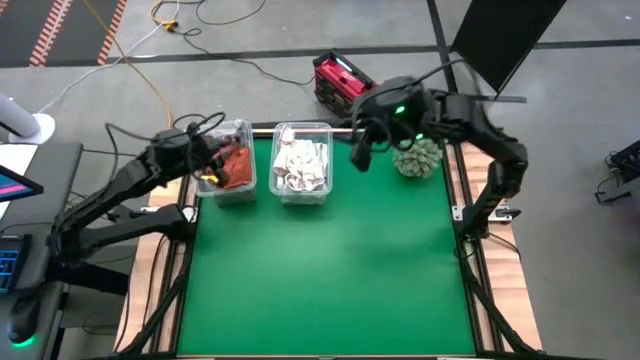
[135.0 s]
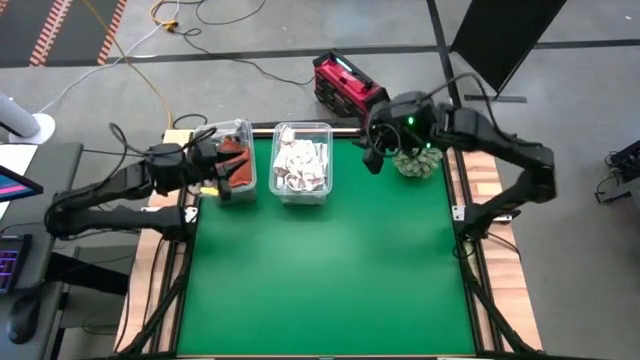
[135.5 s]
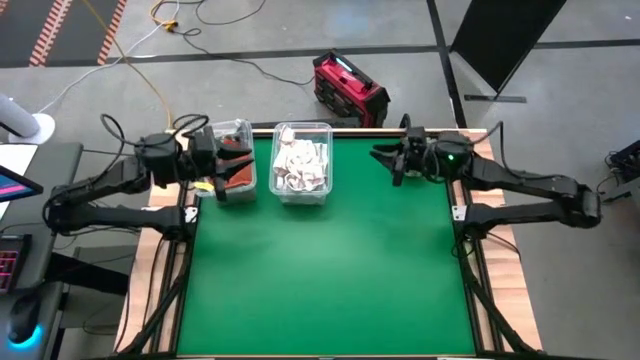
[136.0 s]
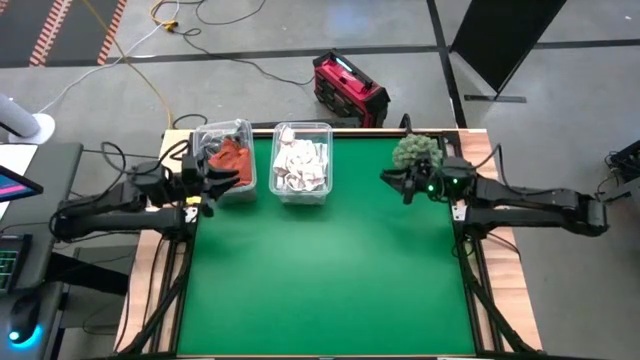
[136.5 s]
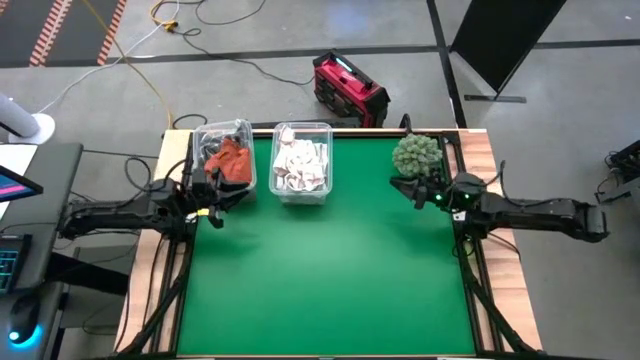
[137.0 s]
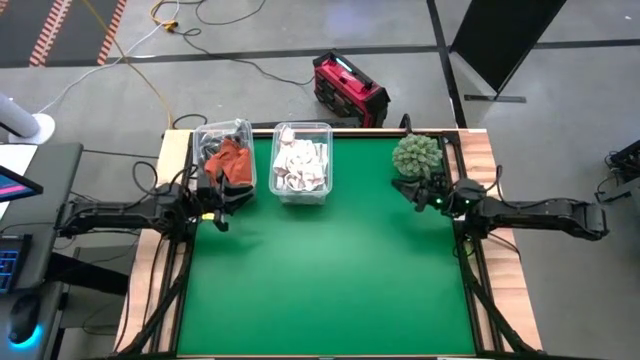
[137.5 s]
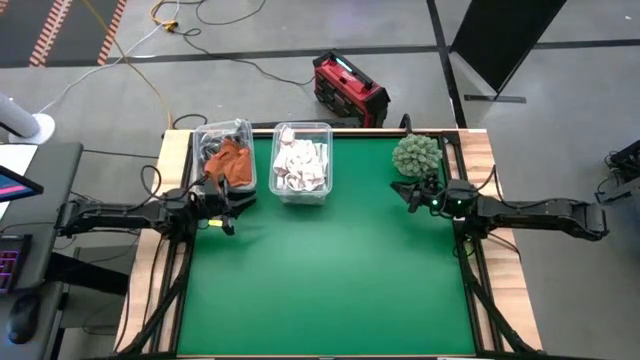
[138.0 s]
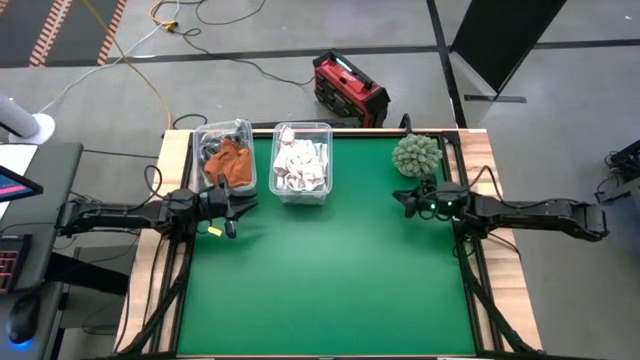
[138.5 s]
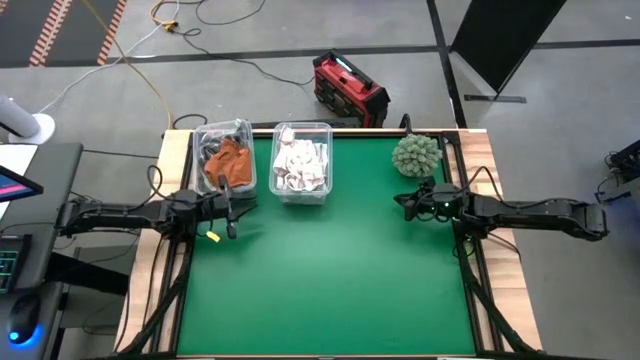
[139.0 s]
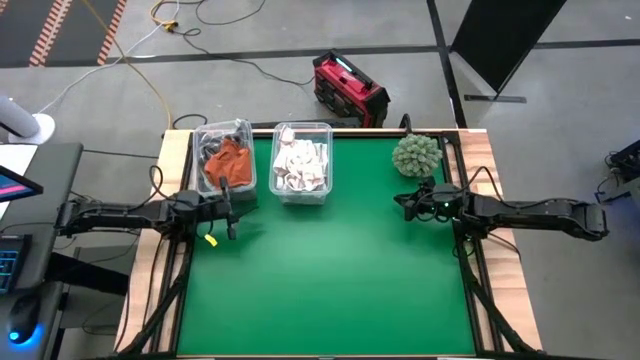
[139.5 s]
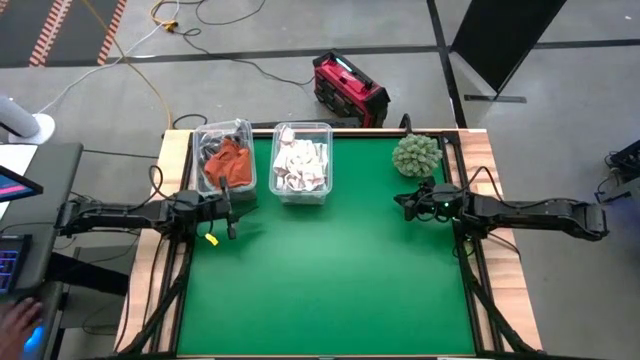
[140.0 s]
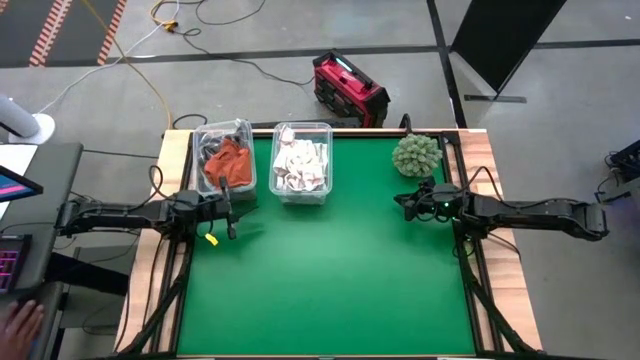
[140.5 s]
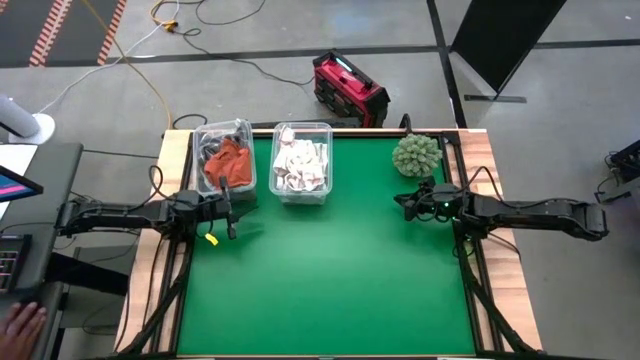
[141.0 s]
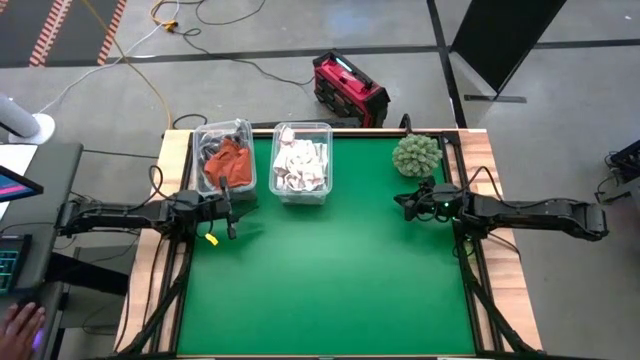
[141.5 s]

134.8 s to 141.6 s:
Task: Sort towels by color in basket
Return to Home Position

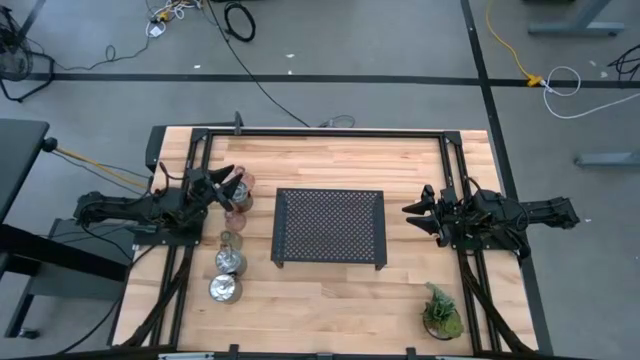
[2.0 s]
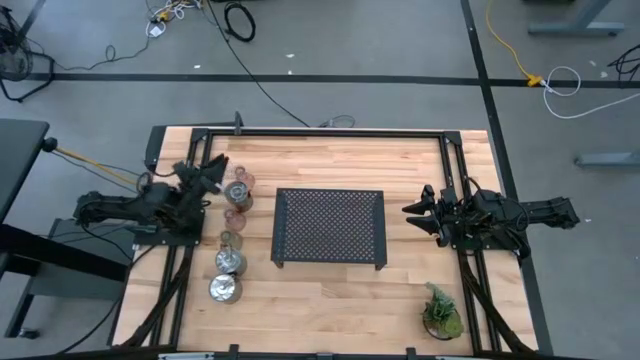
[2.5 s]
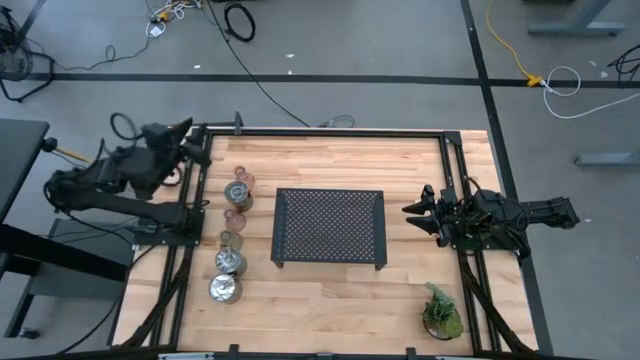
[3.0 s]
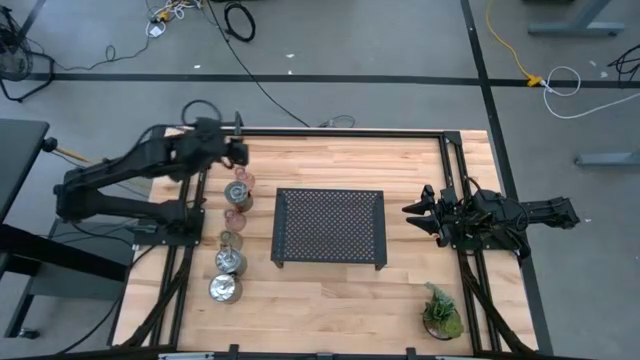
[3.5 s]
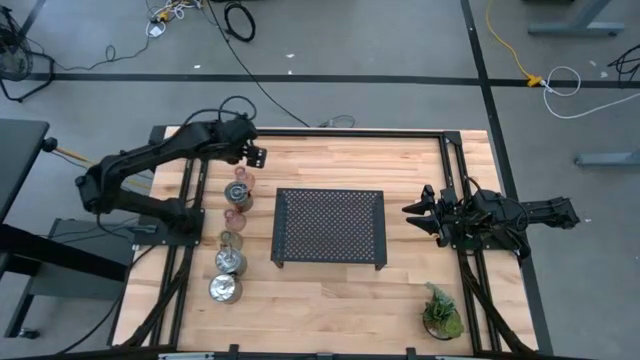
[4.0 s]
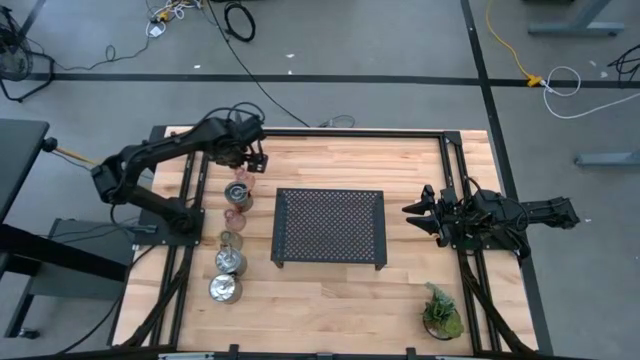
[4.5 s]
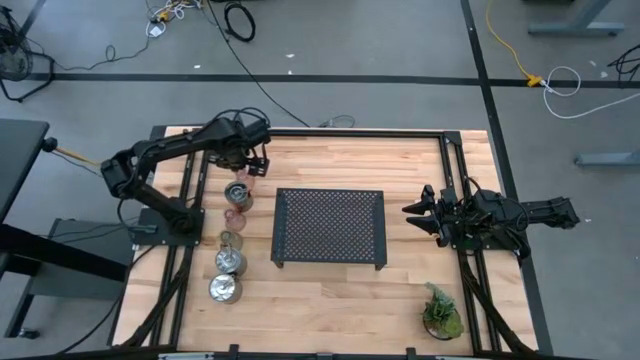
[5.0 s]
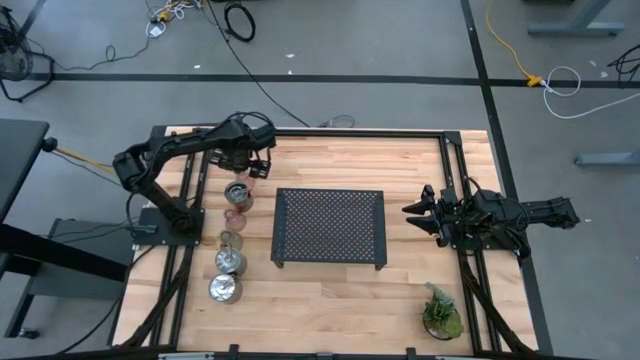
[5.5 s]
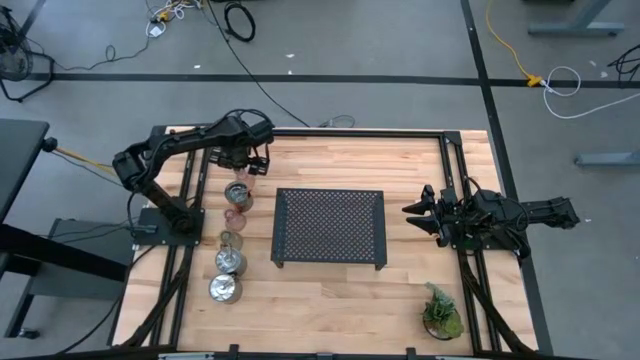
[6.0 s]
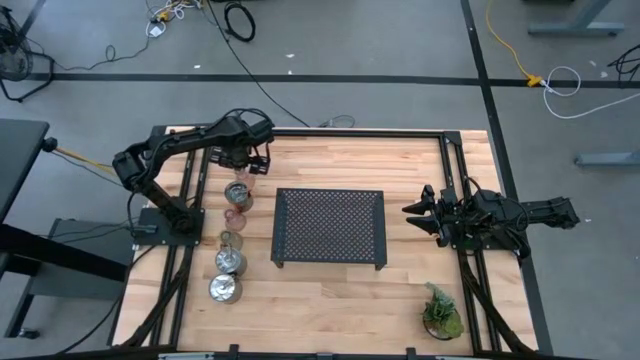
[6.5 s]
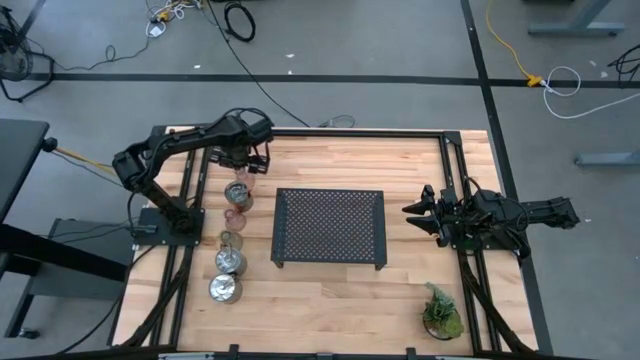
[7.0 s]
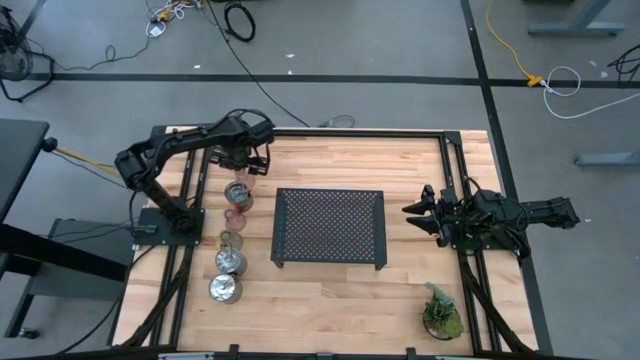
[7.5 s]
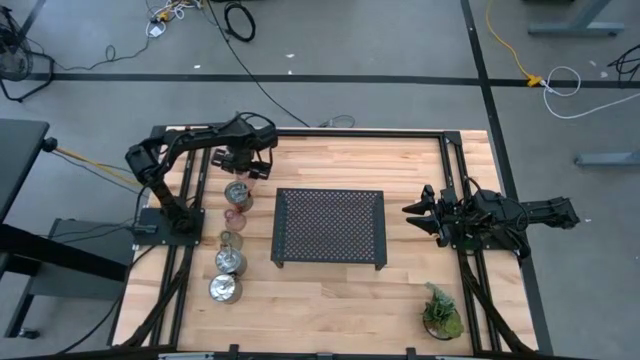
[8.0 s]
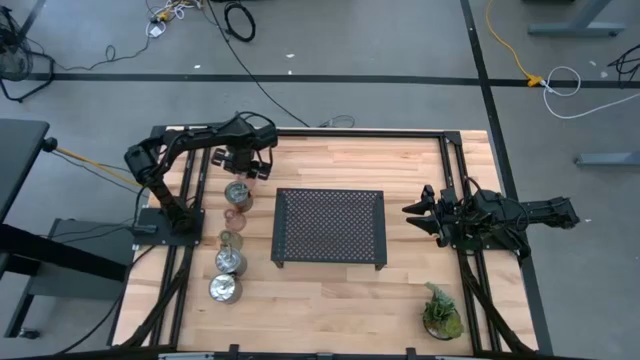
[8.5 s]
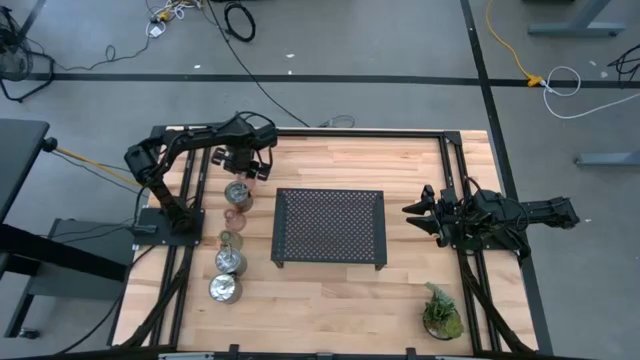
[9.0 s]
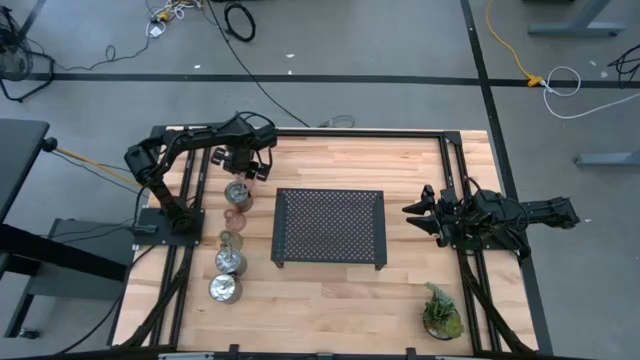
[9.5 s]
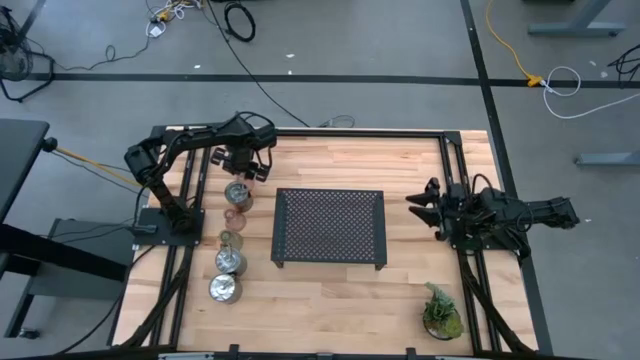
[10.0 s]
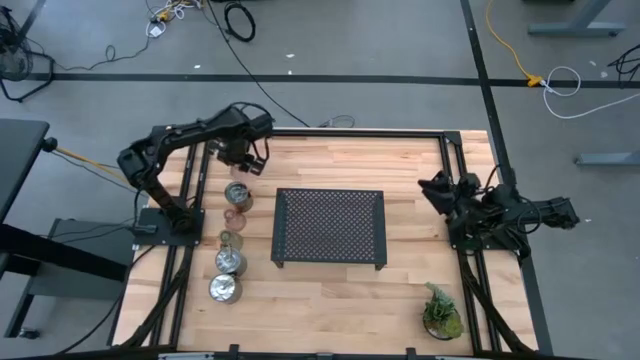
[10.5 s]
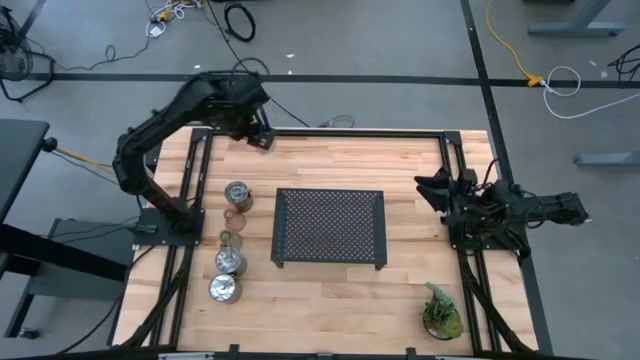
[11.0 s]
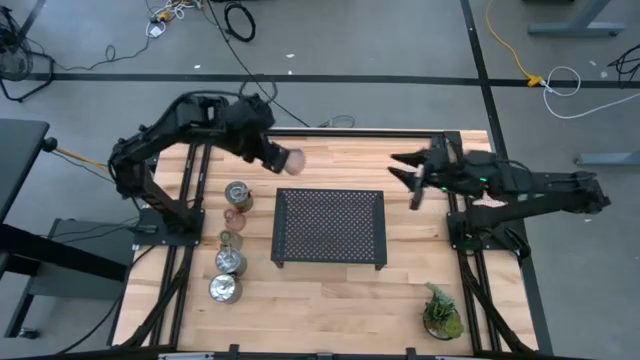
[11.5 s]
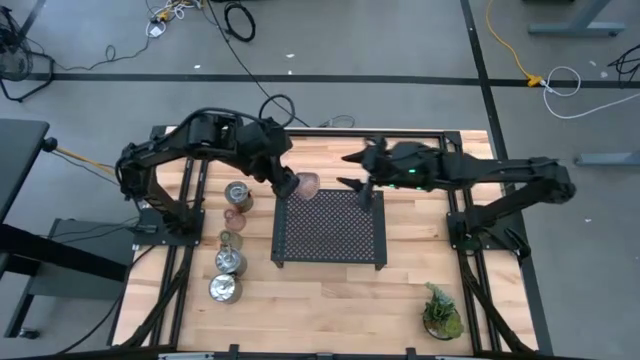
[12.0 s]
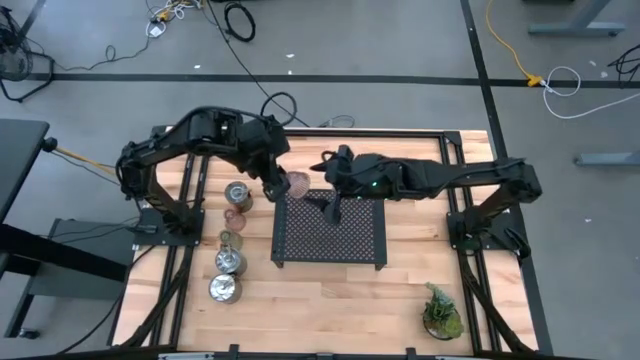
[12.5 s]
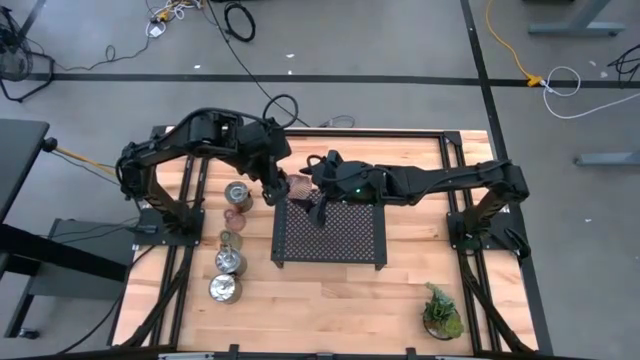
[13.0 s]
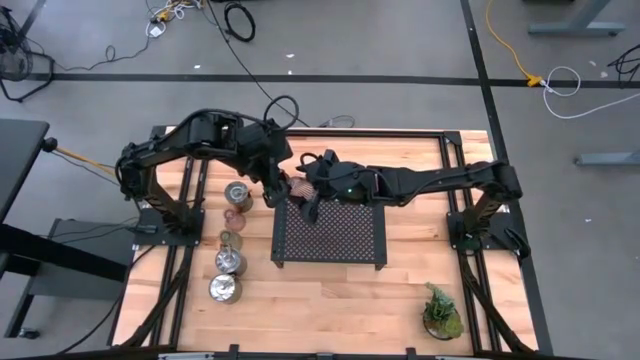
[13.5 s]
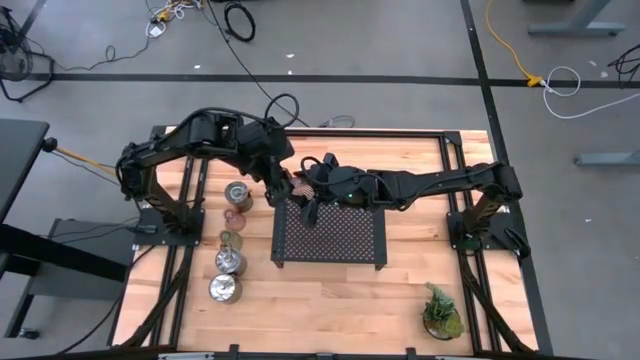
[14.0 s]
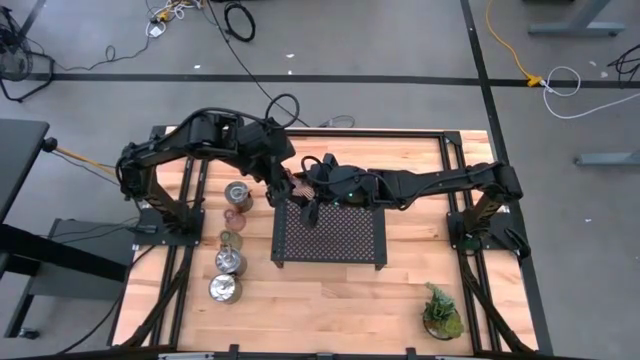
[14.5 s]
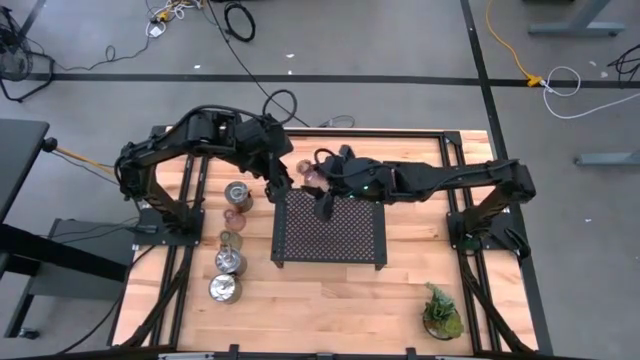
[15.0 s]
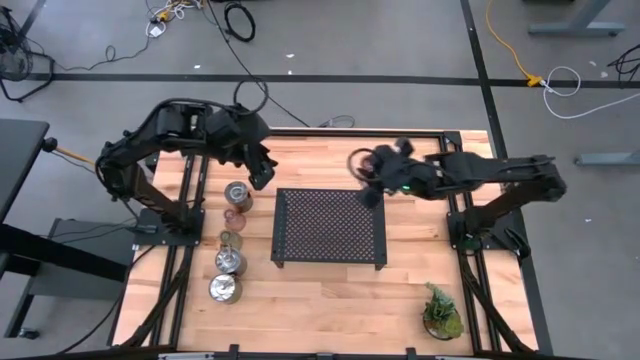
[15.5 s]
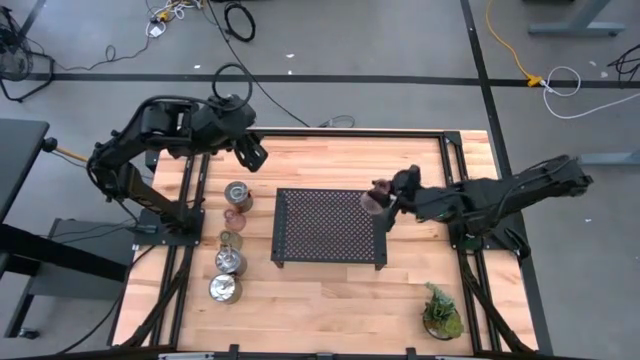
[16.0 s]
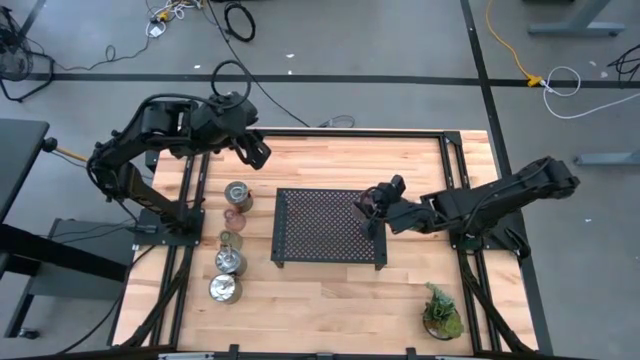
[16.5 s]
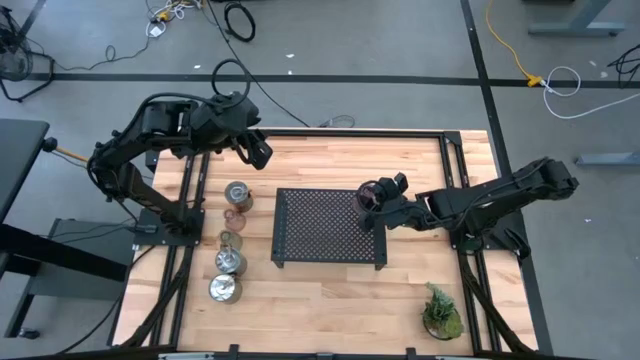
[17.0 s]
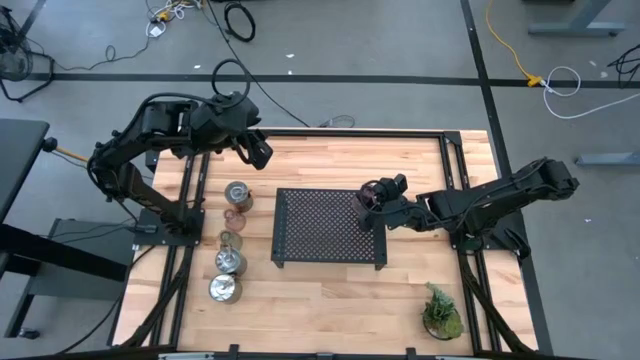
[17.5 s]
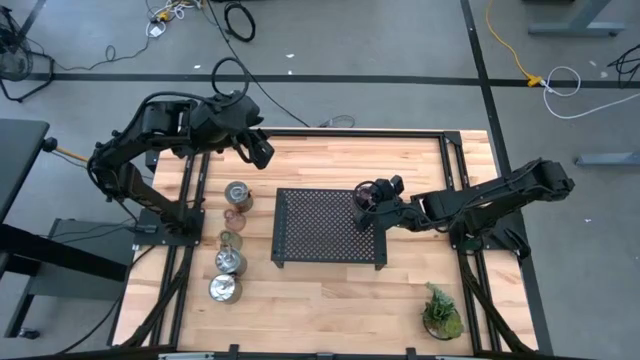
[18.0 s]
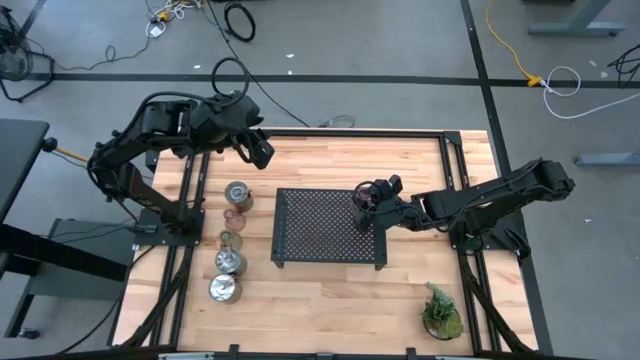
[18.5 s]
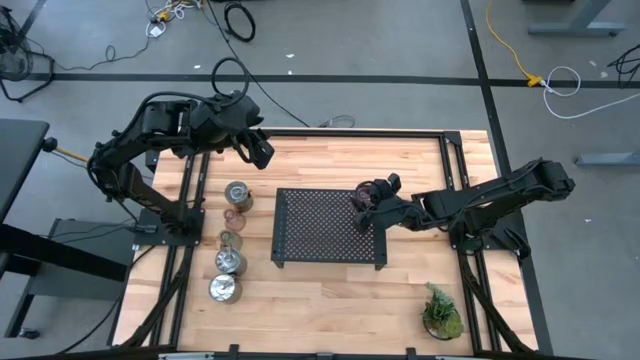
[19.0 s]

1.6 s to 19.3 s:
Task: Pick & Place candle stick holders
Put the pink candle holder on the shelf
